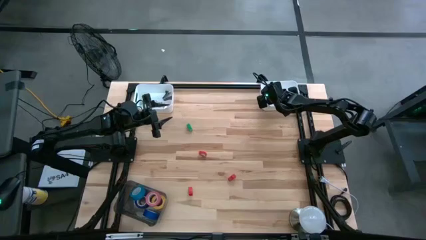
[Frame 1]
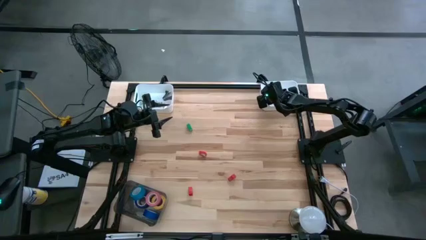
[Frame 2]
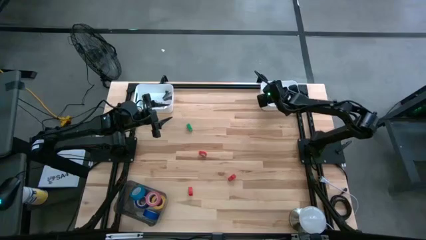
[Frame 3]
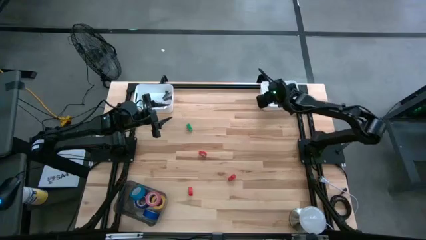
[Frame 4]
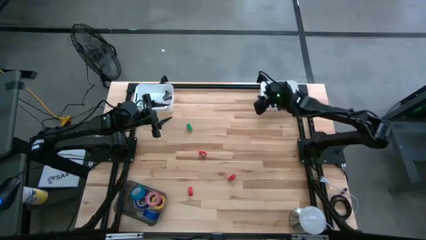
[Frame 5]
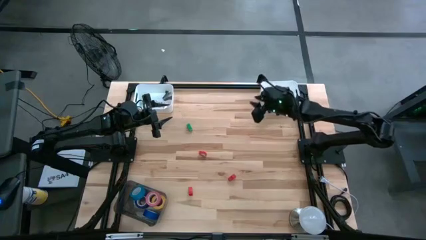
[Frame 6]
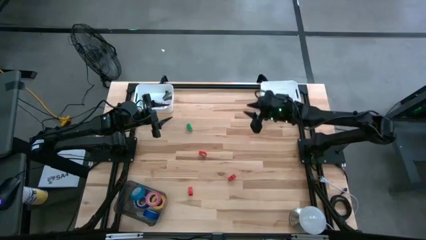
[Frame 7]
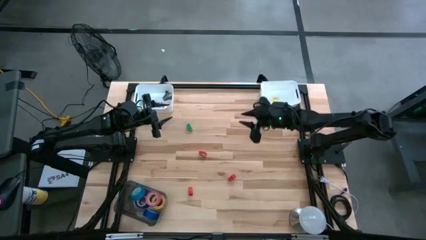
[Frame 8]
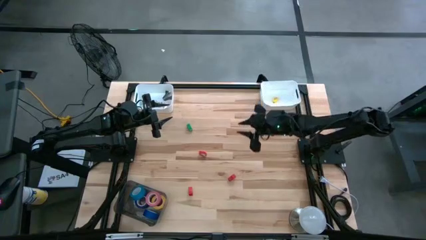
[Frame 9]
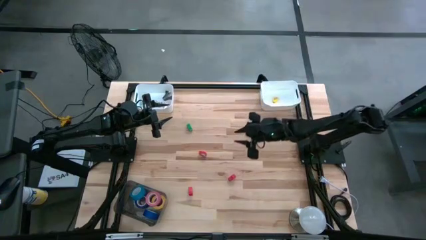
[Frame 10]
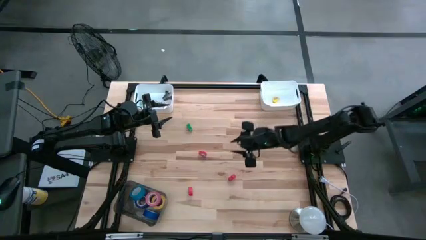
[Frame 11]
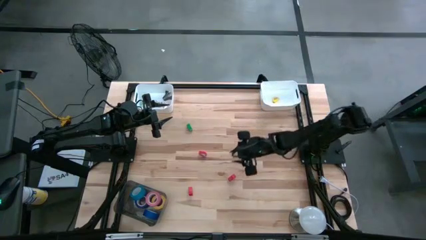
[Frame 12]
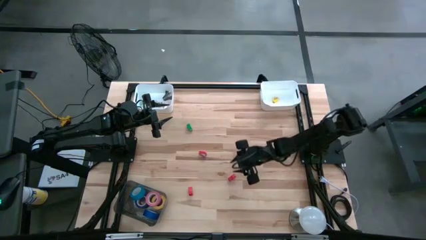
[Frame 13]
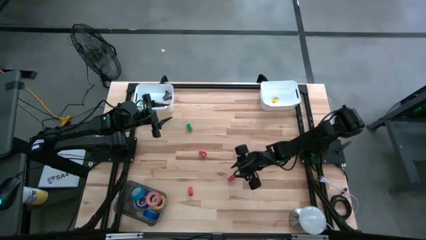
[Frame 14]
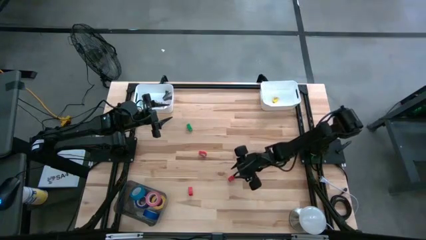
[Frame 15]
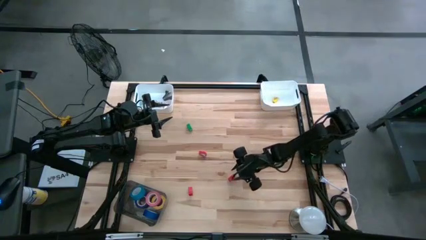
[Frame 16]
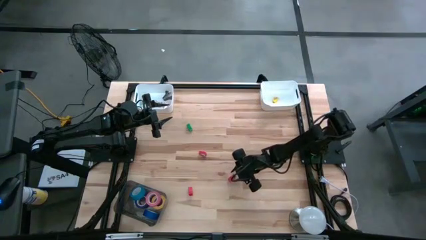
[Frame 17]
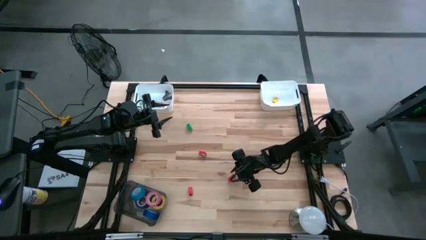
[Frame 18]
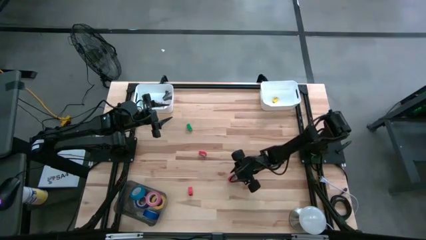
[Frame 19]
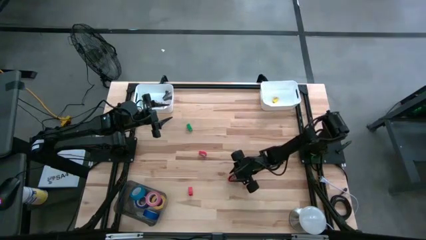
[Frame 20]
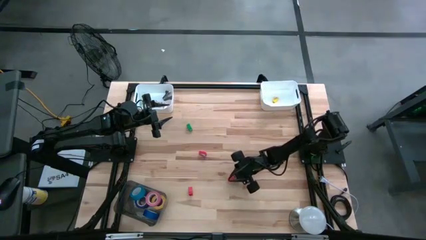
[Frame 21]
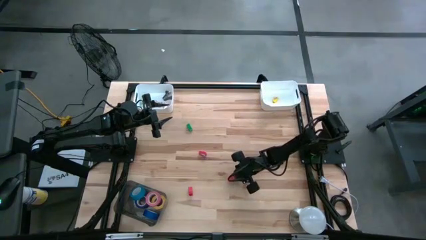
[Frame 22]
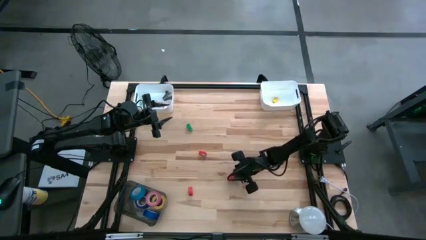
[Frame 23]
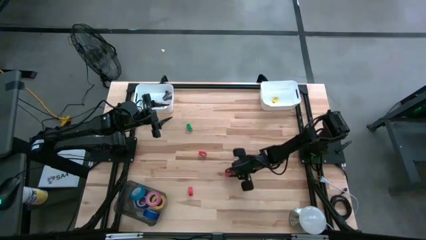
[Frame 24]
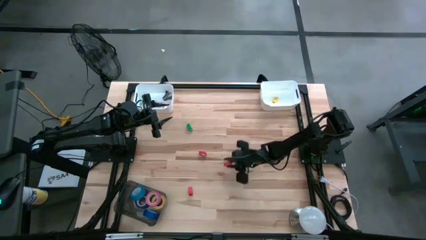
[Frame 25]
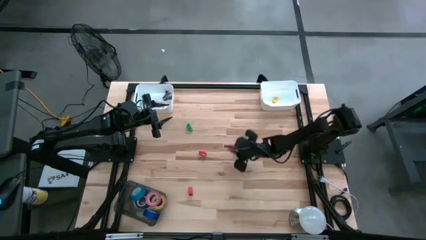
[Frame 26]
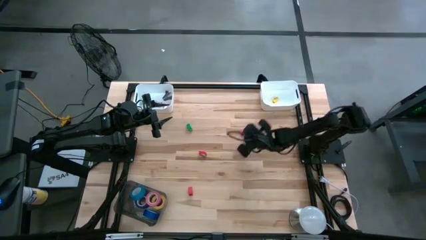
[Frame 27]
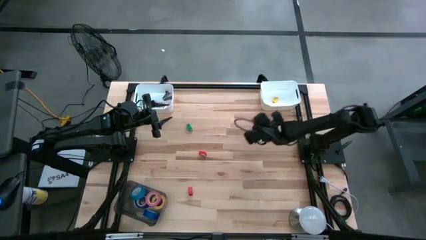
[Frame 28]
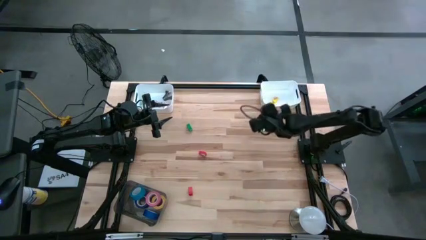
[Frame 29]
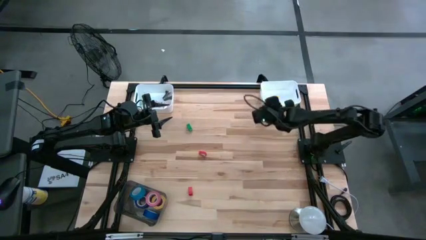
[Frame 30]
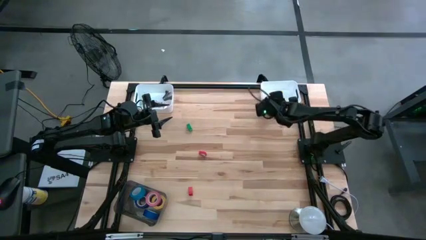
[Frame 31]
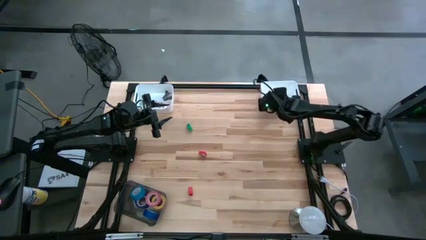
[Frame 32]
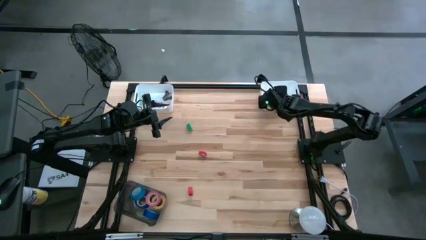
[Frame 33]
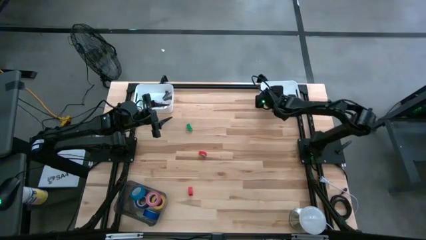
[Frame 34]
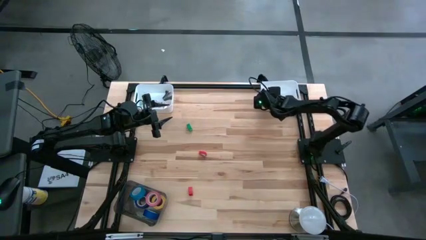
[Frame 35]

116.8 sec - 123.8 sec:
Task: Pick and place Stapler, Stapler remover, tape
Put the middle right red stapler into the right white bin

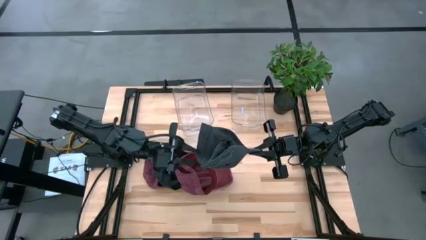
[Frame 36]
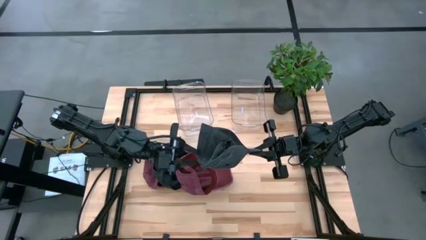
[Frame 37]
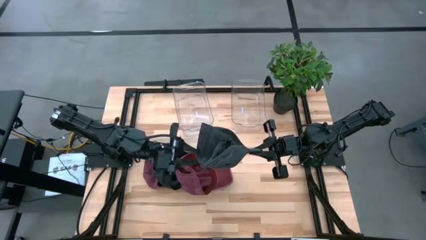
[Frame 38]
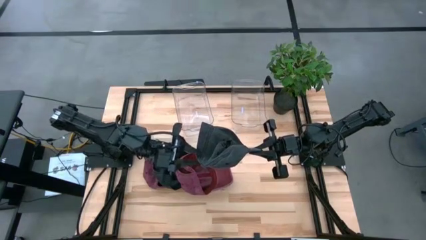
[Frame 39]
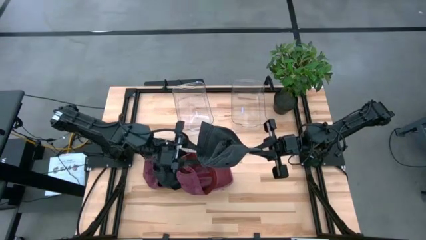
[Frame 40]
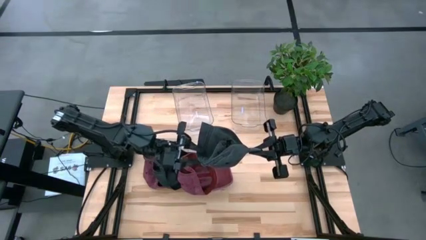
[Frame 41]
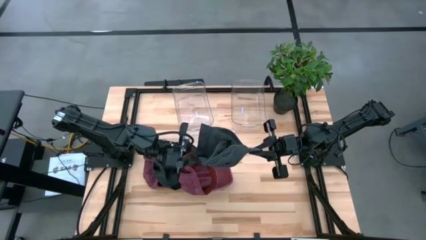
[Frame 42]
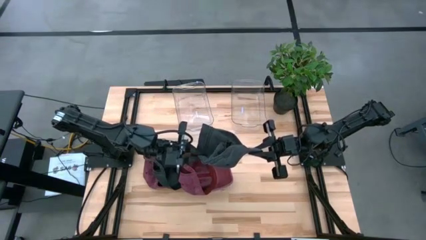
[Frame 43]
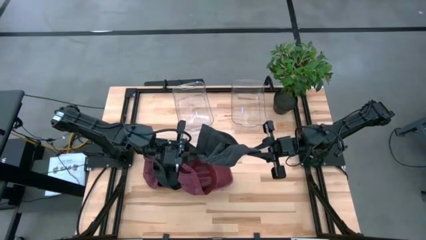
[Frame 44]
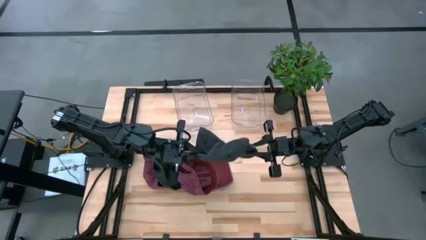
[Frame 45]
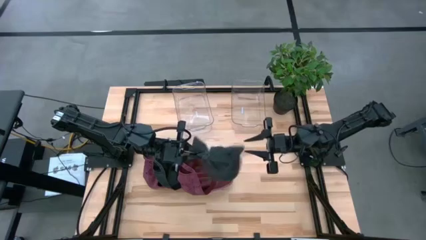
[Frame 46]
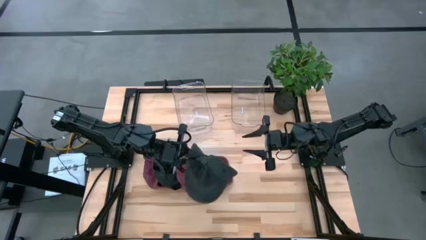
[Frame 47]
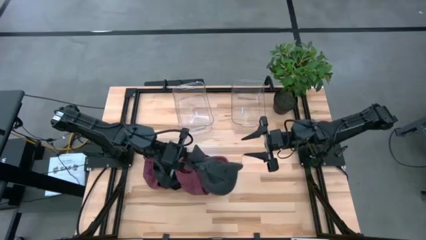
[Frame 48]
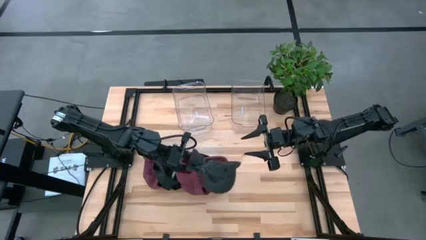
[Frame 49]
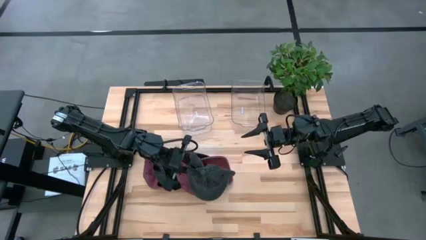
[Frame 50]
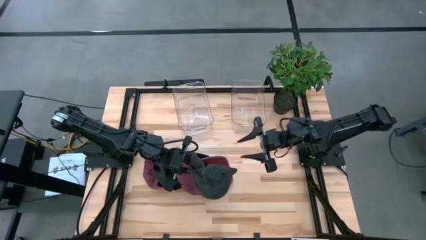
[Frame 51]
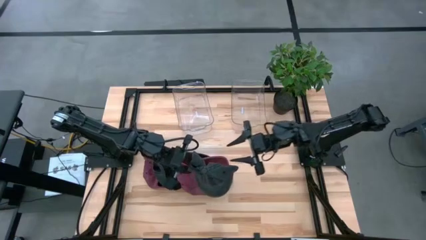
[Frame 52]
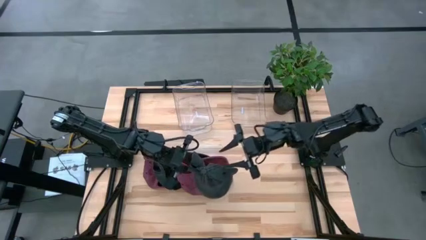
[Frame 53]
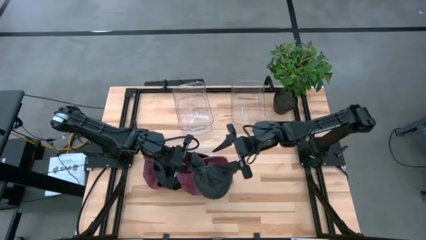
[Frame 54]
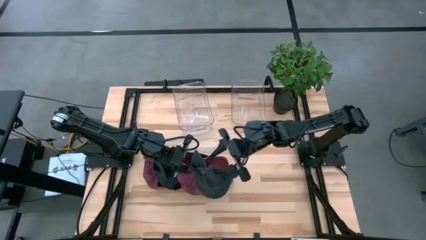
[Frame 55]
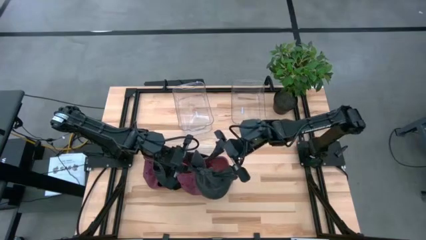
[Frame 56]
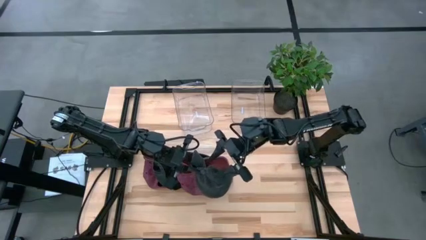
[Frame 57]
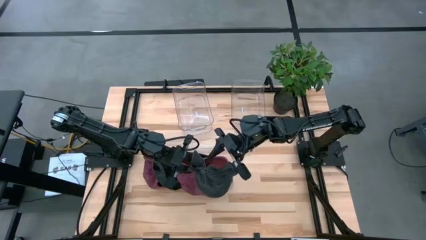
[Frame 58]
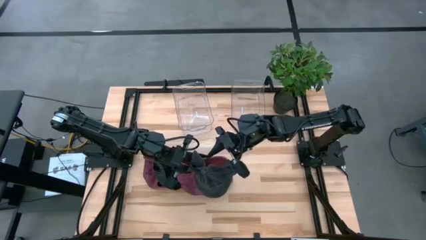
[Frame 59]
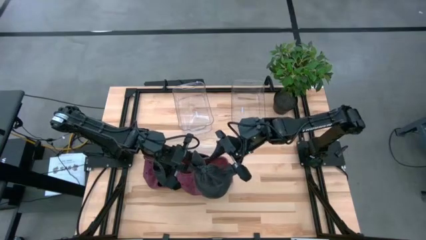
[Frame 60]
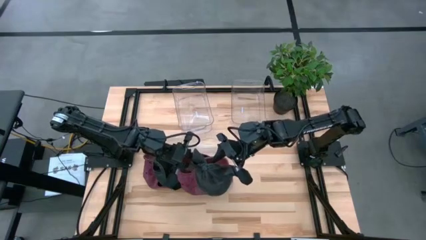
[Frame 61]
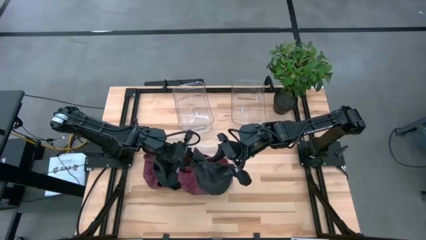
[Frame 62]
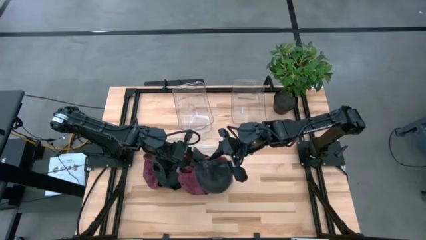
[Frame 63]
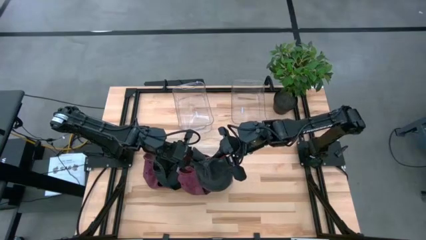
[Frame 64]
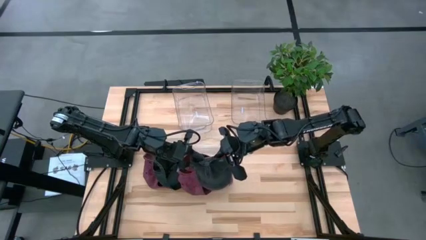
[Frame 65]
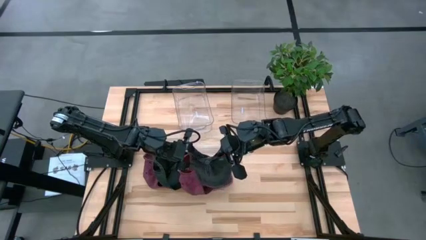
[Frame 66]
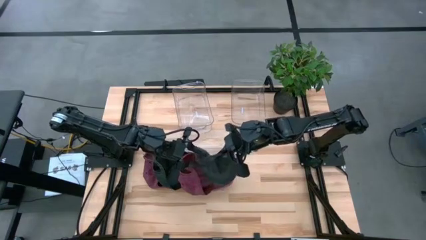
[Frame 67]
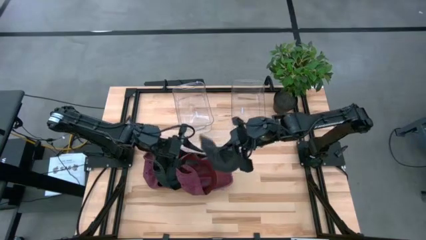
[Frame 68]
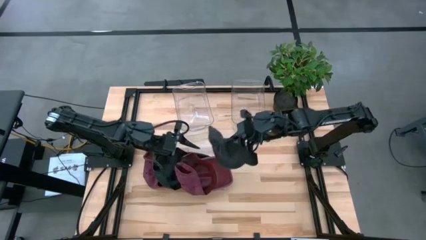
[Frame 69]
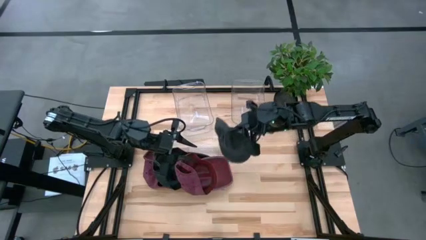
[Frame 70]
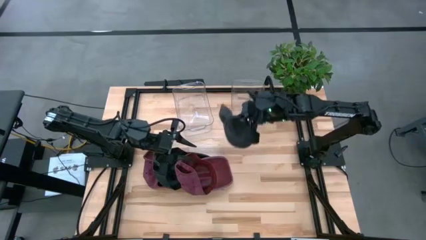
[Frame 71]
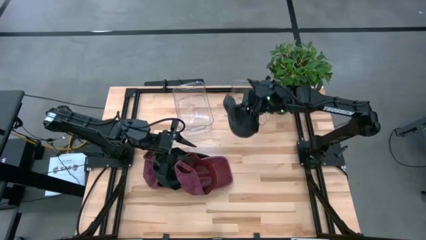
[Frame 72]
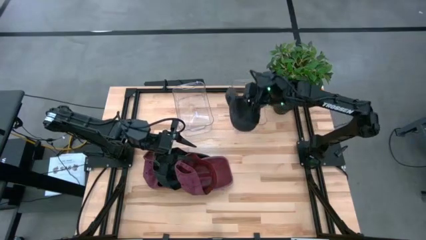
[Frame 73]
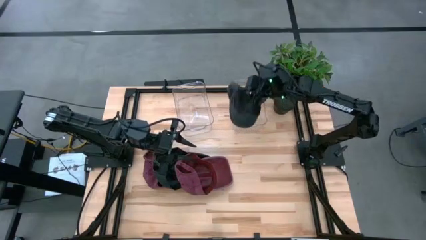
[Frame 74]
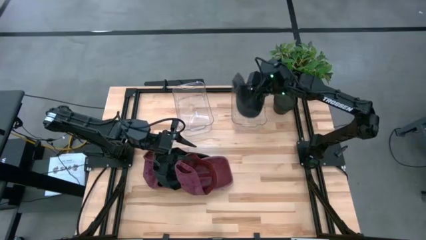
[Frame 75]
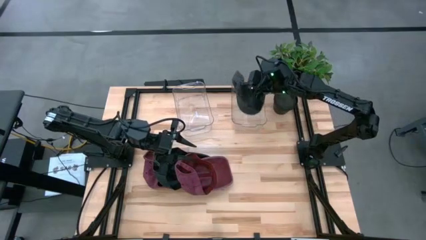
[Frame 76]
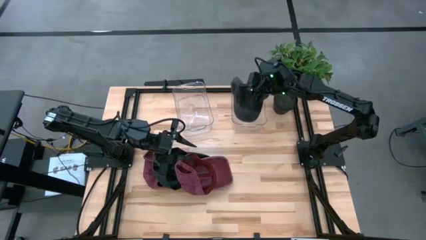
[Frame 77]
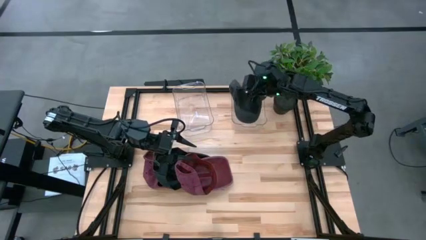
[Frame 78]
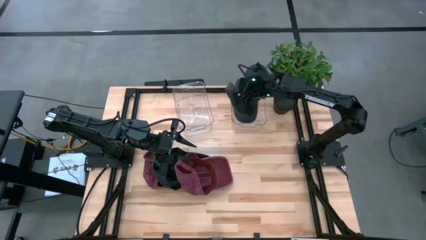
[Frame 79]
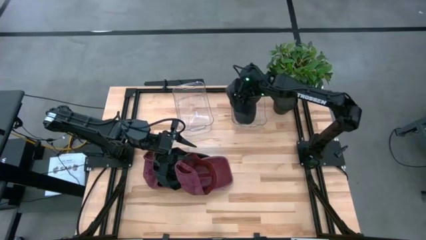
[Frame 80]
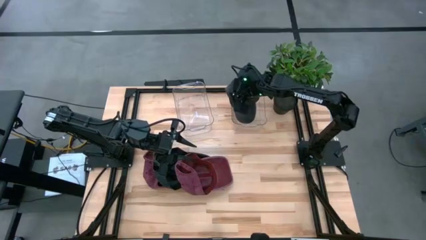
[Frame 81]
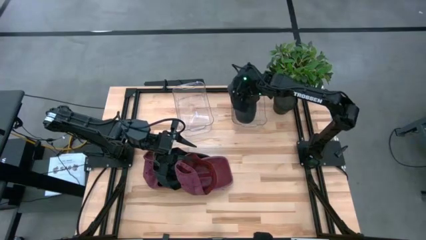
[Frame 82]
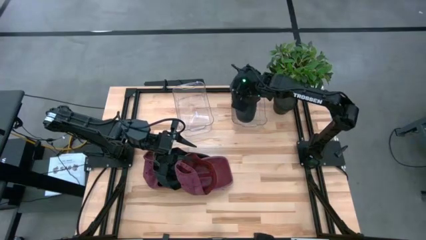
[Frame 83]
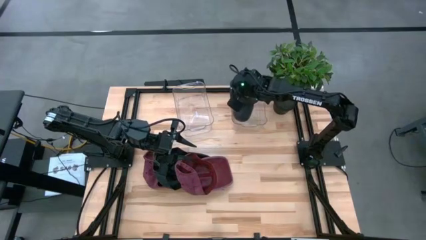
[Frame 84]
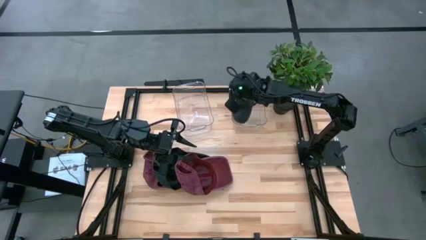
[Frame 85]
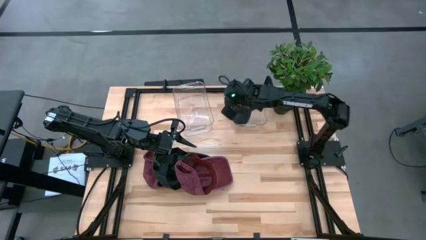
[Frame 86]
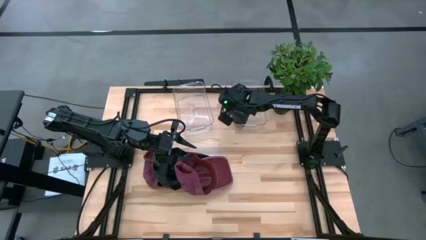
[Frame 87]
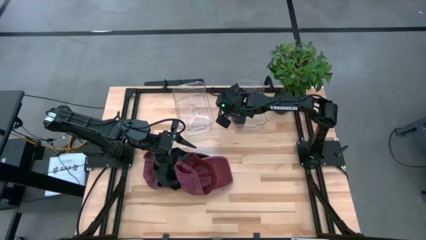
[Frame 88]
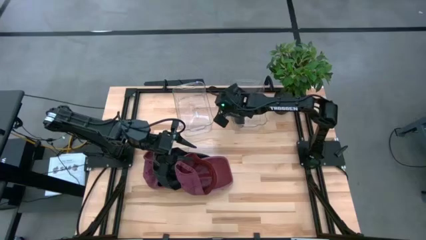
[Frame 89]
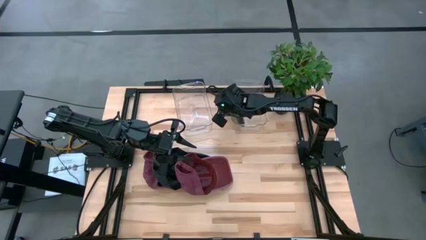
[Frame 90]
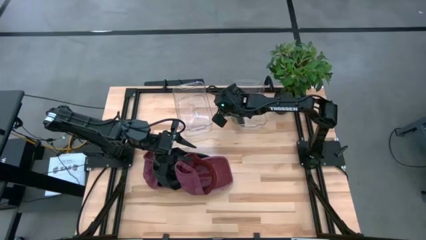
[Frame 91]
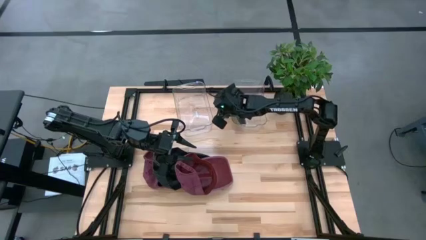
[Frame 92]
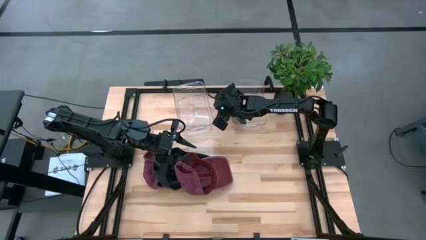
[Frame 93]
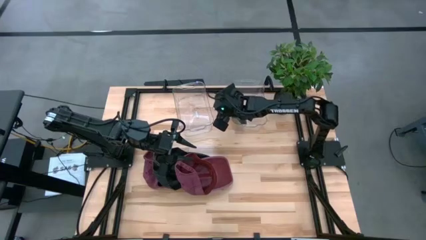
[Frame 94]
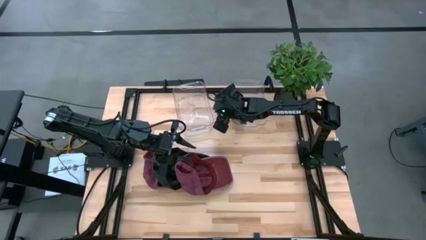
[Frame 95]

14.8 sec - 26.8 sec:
Task: Pick & Place hat
Put the right black cap in the right transparent bin
